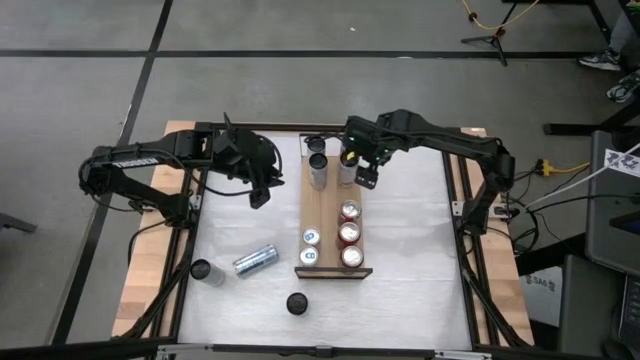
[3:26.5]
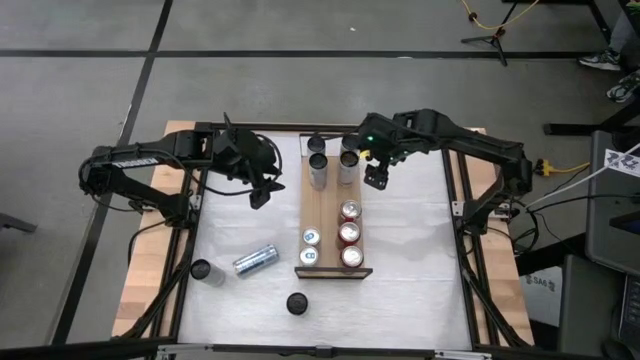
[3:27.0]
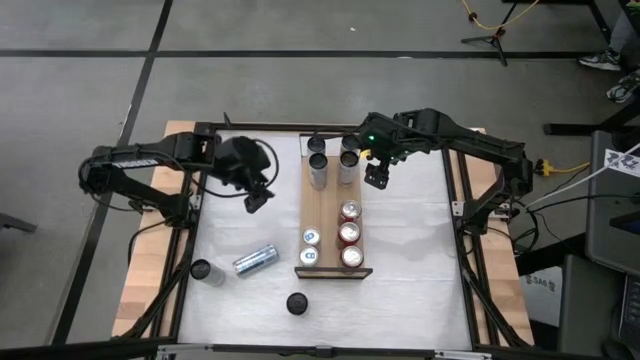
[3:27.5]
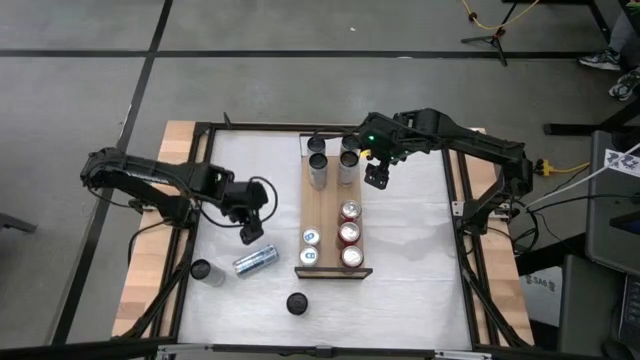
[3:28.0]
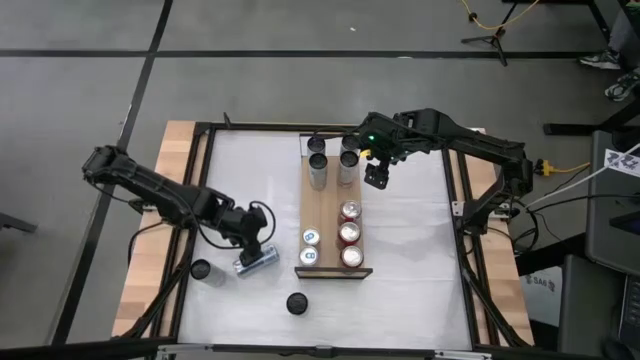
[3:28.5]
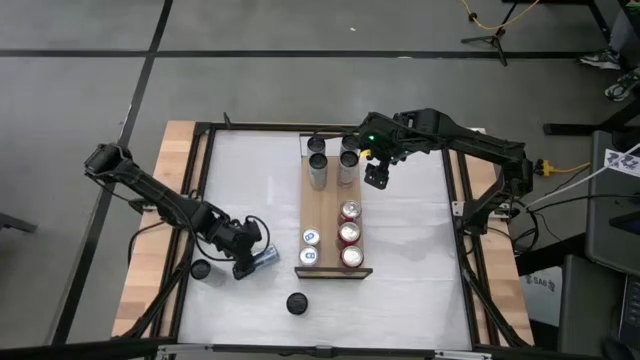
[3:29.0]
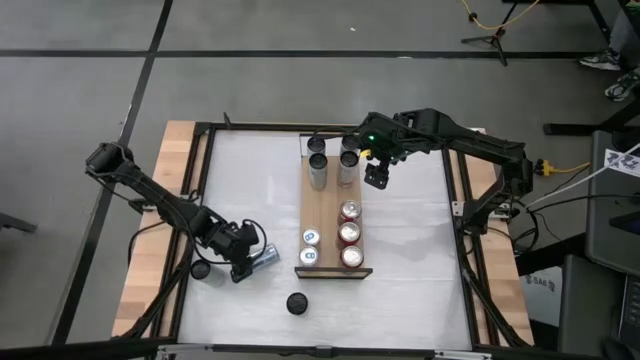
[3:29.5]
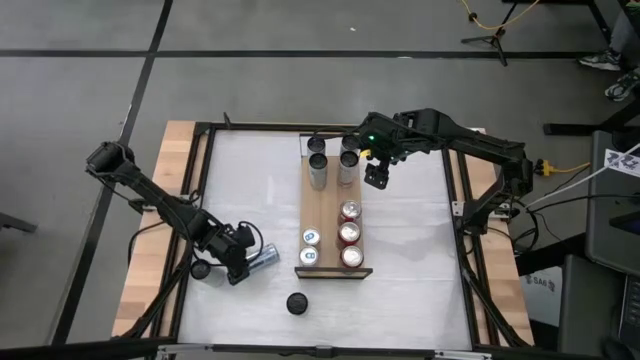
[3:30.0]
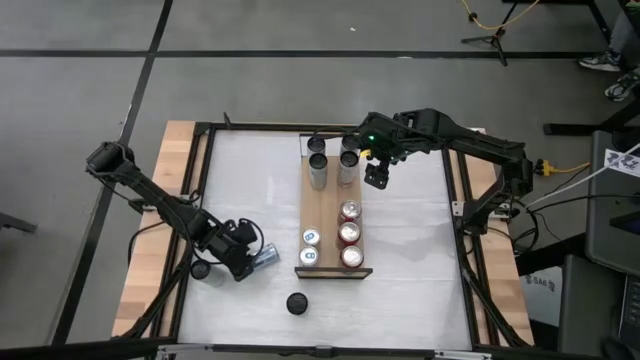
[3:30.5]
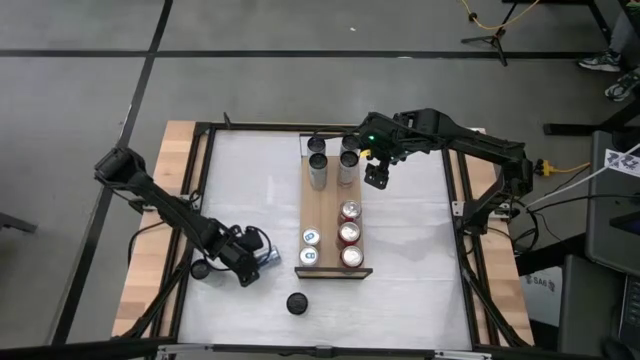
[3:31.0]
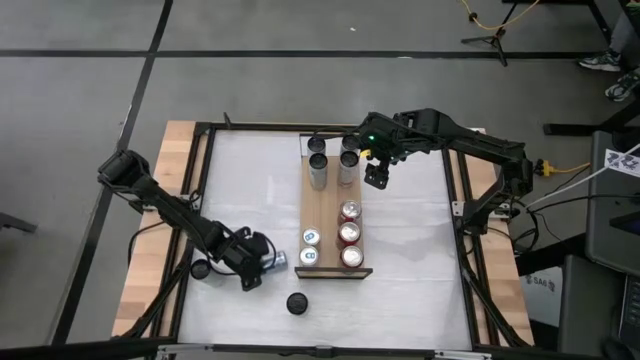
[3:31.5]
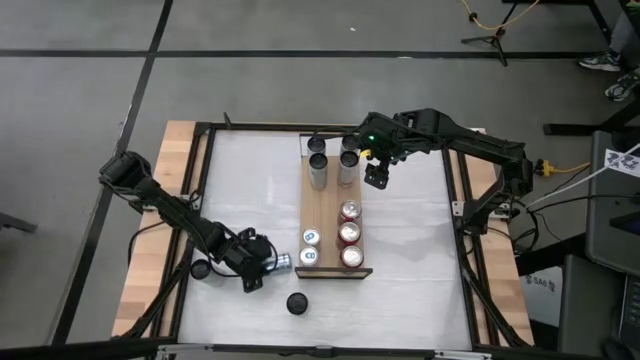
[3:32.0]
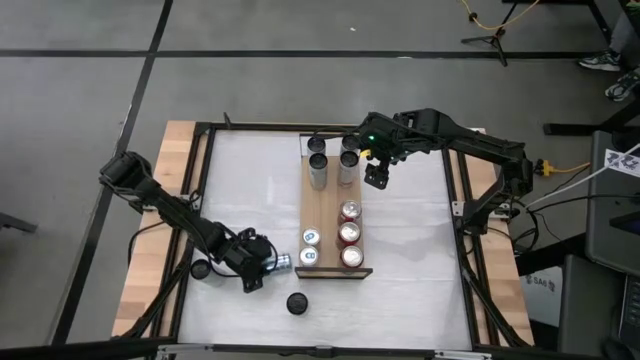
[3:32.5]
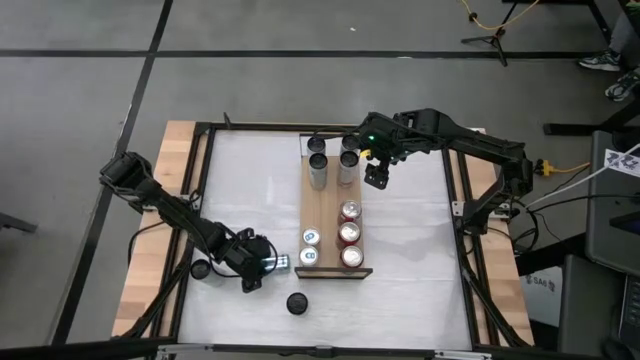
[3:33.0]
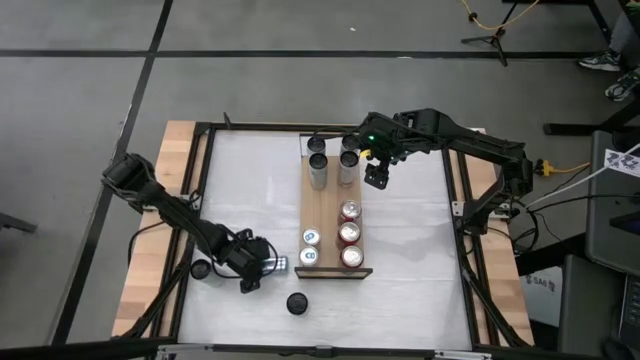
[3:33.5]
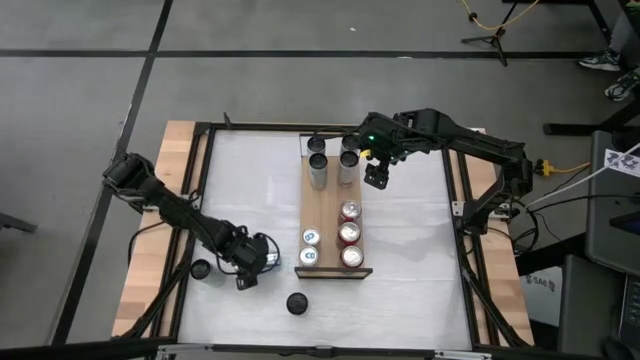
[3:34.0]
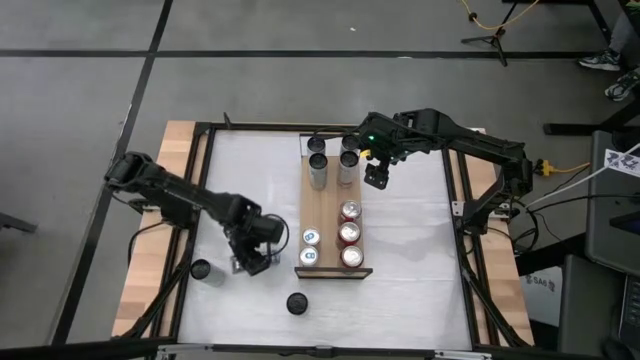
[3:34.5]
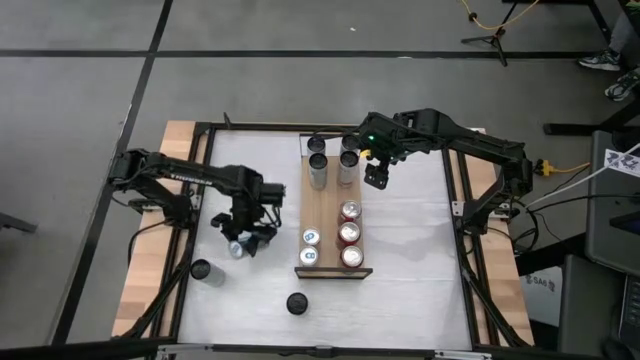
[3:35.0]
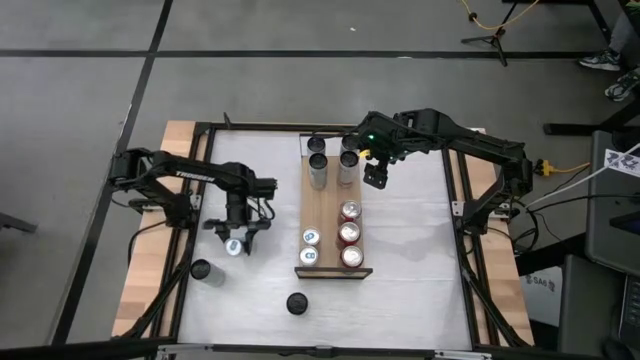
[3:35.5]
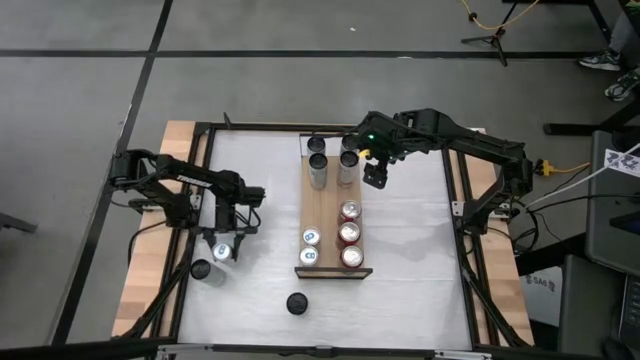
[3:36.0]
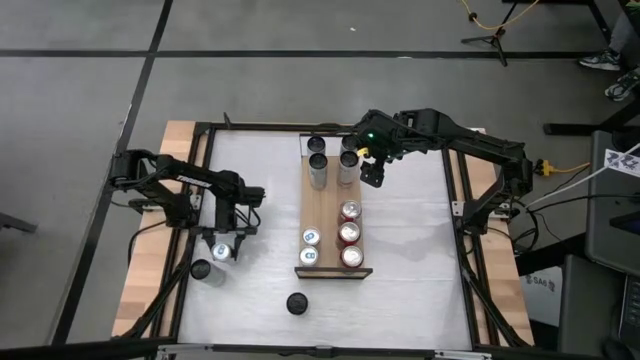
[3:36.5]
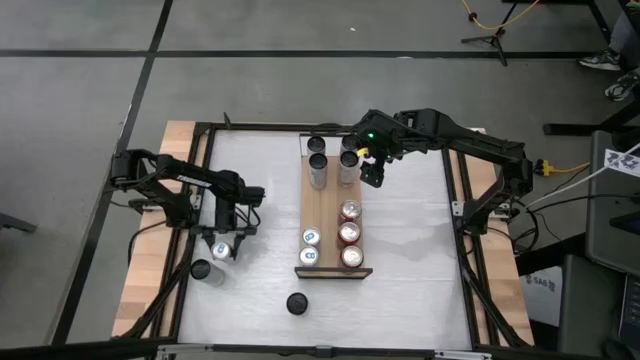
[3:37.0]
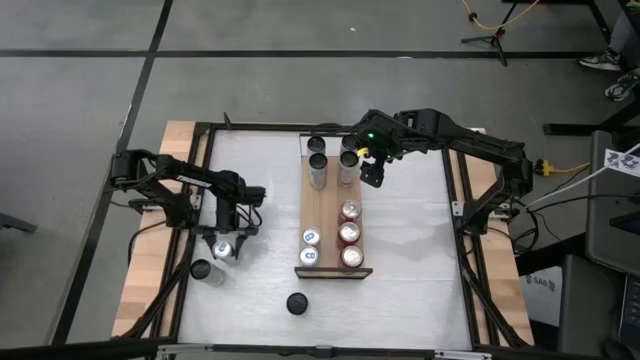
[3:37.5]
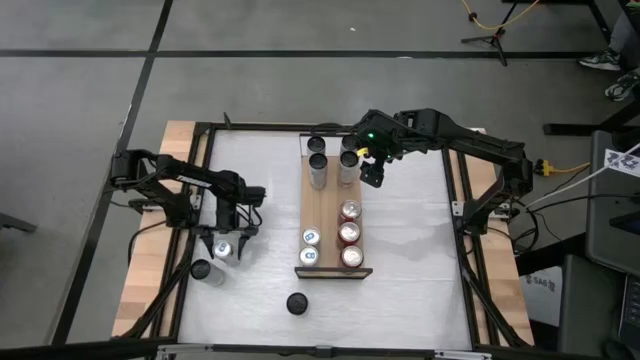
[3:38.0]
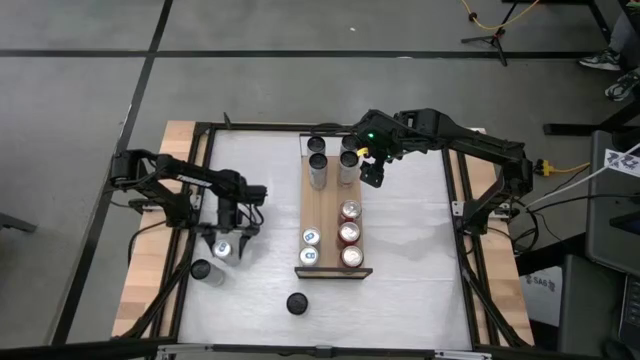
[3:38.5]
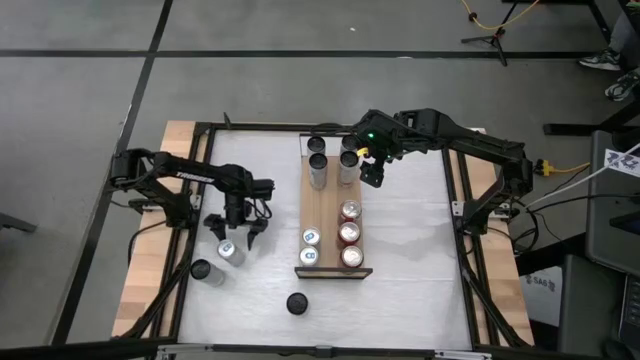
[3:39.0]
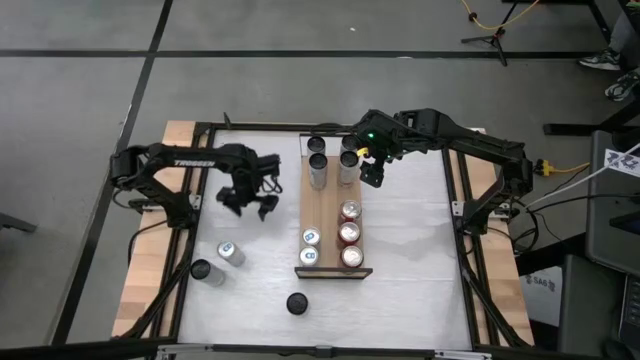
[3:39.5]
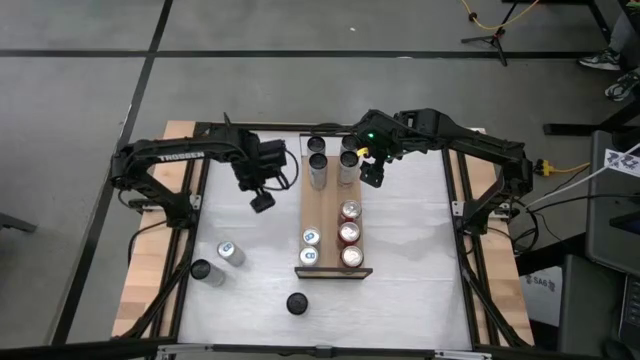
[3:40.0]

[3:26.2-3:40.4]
Task: Place canned beverage on shelf
Put the blue soda can on the shelf aligned with the other blue soda can

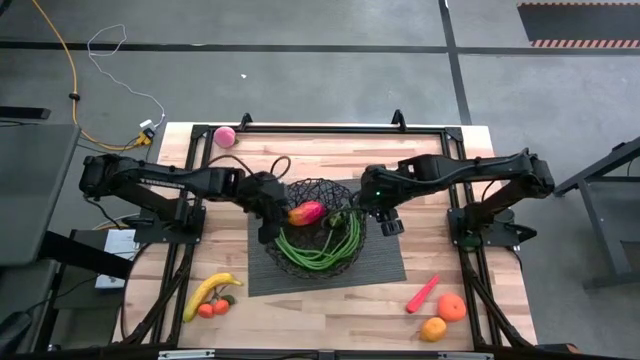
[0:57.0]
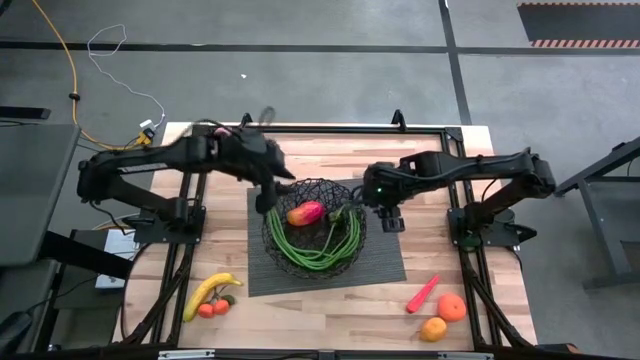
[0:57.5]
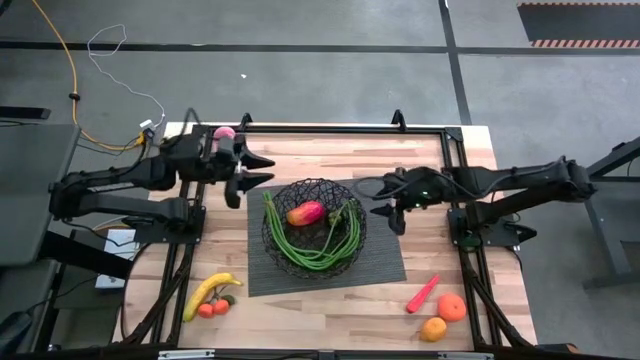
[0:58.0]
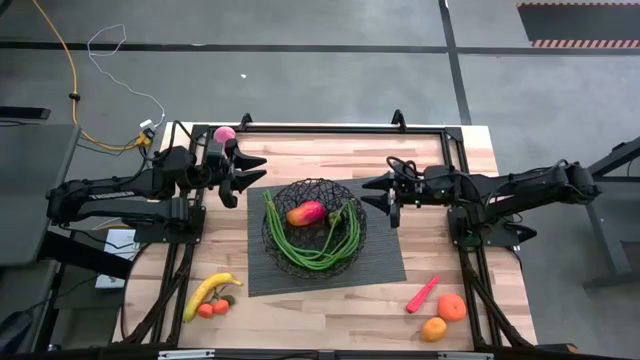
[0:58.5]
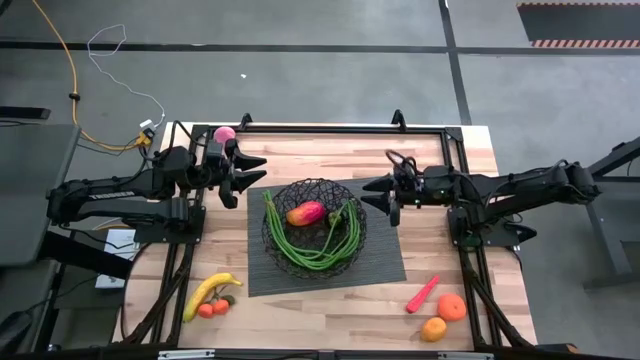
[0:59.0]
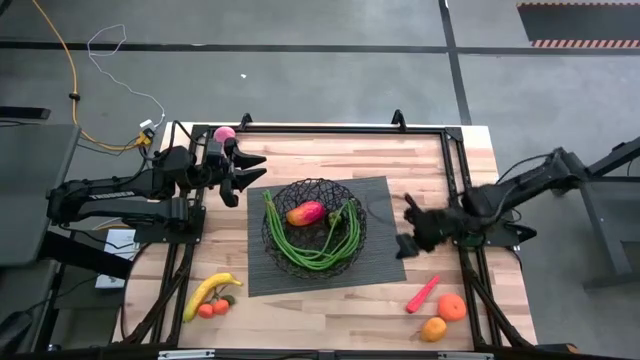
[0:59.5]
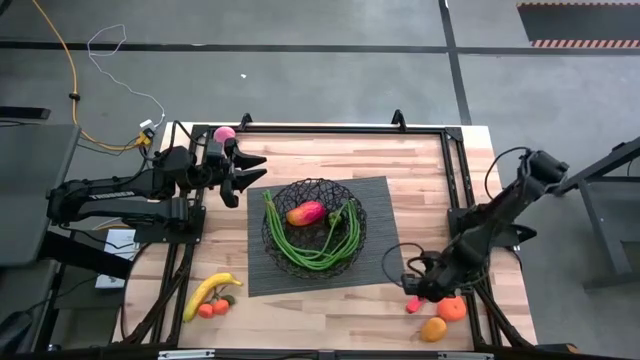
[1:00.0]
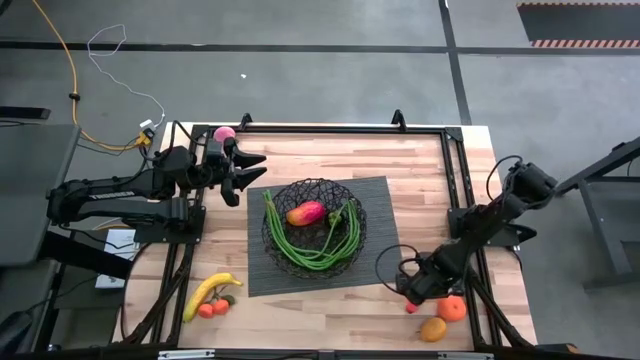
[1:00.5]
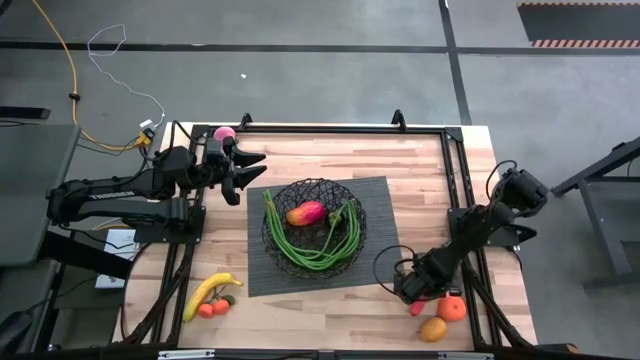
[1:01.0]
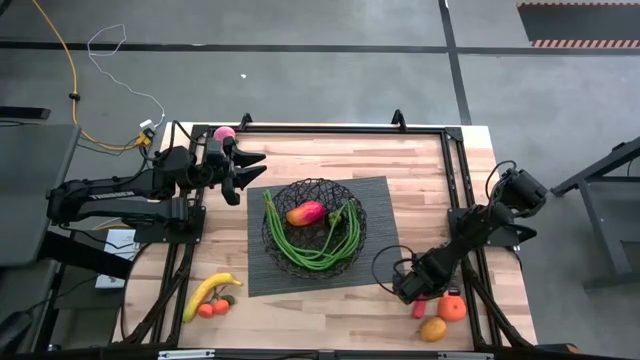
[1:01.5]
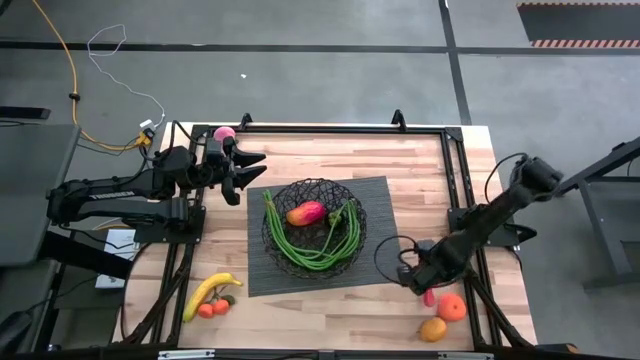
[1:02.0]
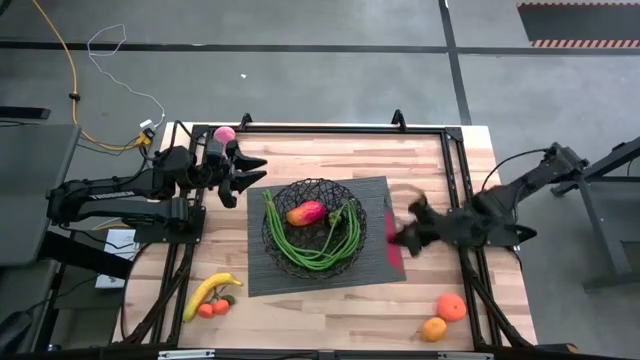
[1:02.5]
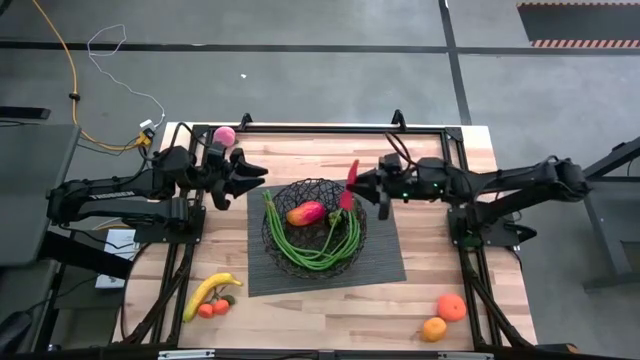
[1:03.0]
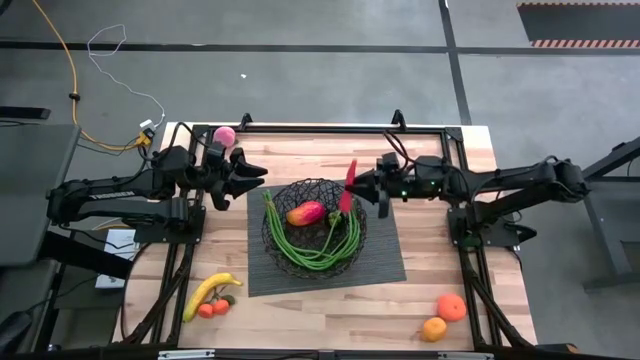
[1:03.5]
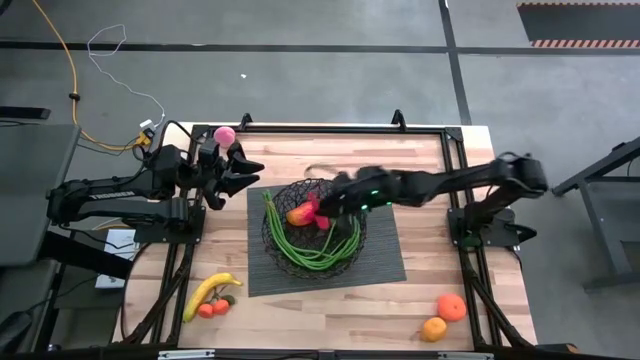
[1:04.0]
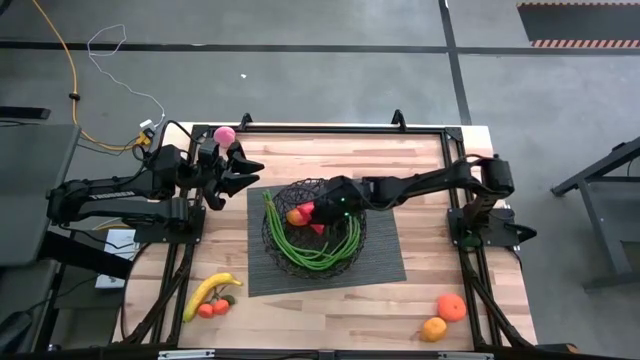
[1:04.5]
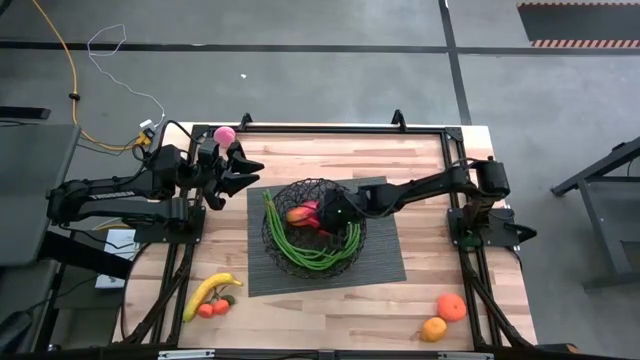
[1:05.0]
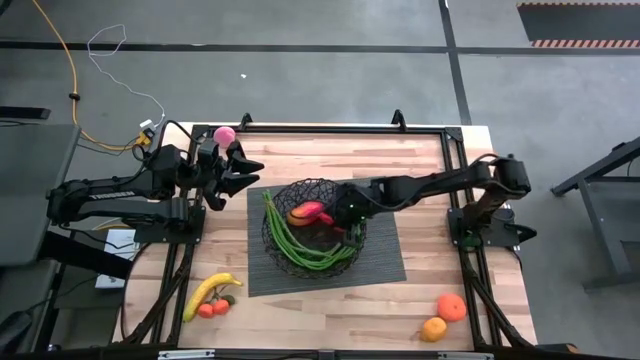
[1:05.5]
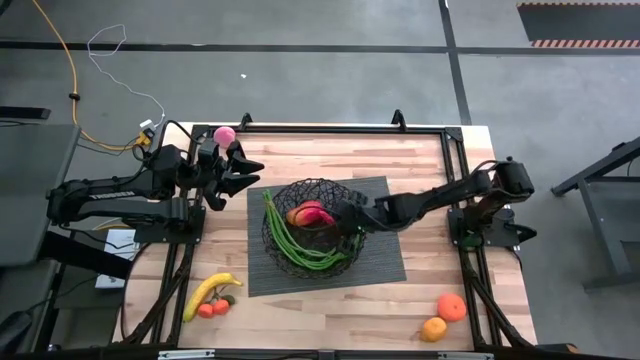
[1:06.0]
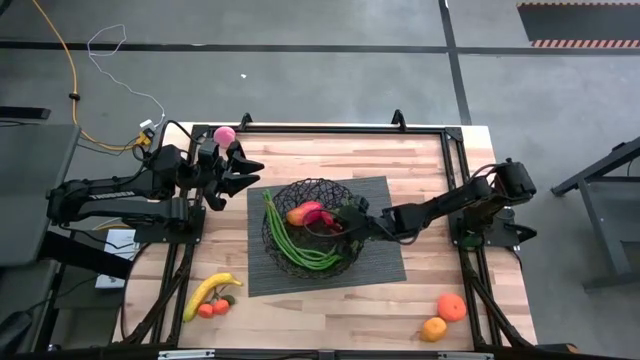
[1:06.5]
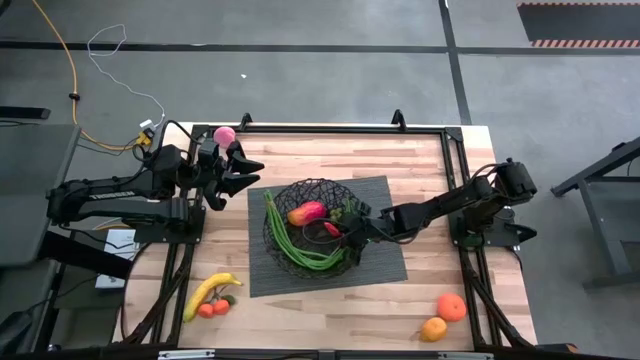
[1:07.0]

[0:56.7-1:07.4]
Task: Build produce basket
Put the orange carrot into the black mesh basket
